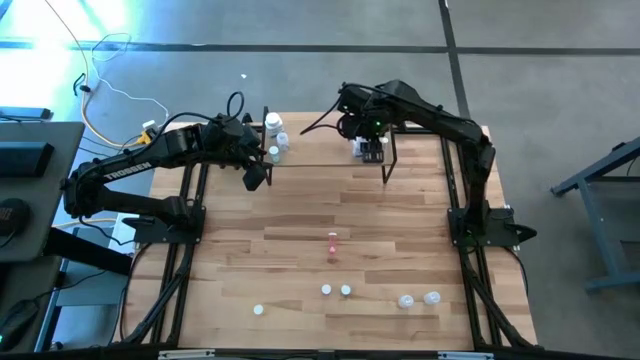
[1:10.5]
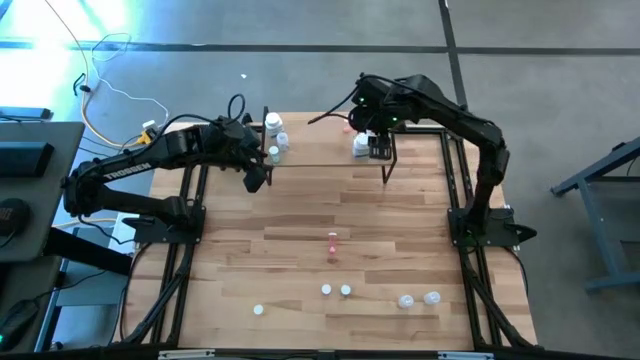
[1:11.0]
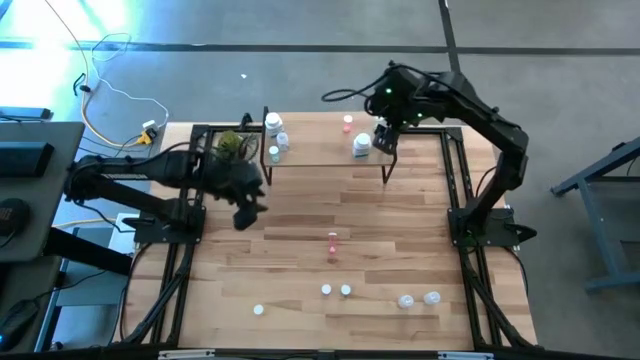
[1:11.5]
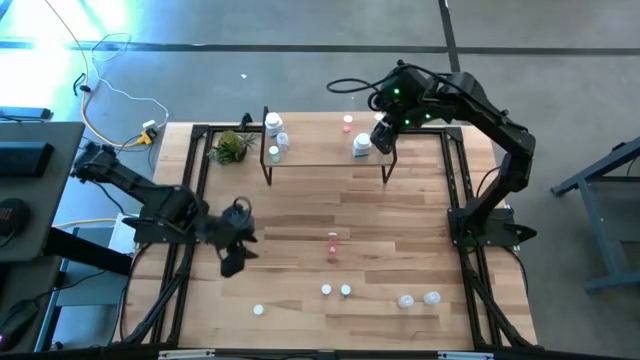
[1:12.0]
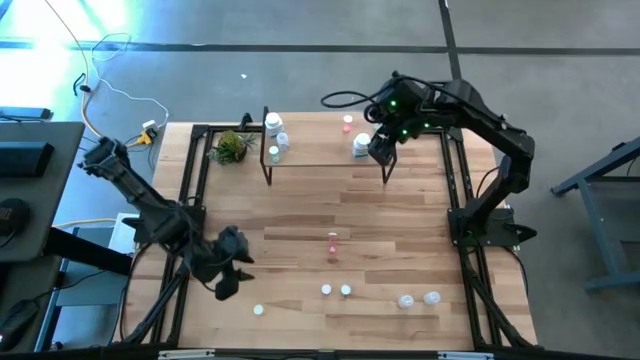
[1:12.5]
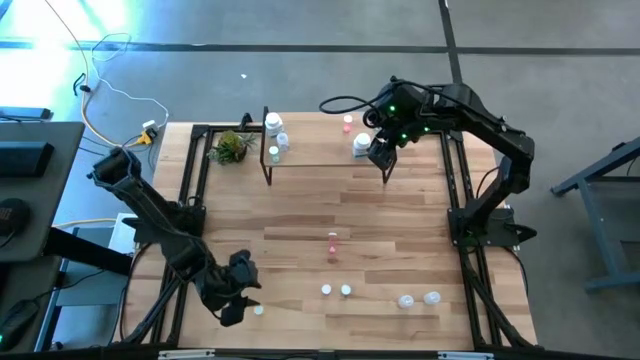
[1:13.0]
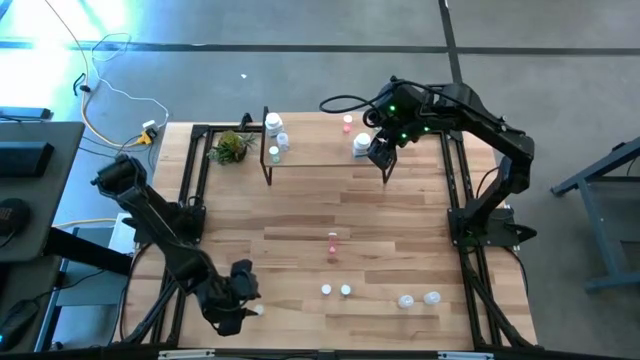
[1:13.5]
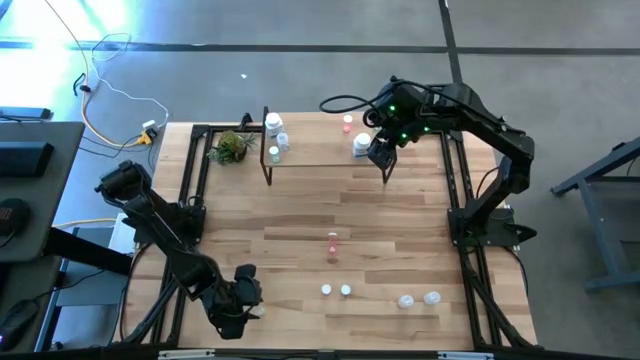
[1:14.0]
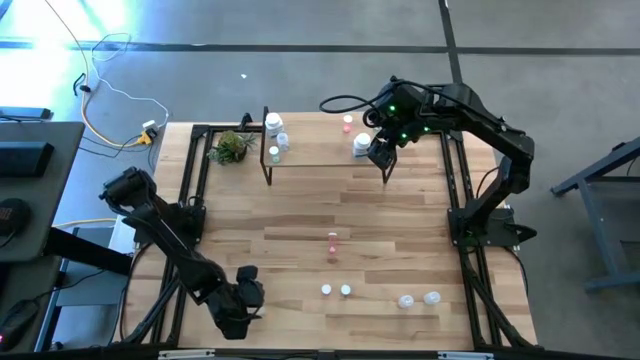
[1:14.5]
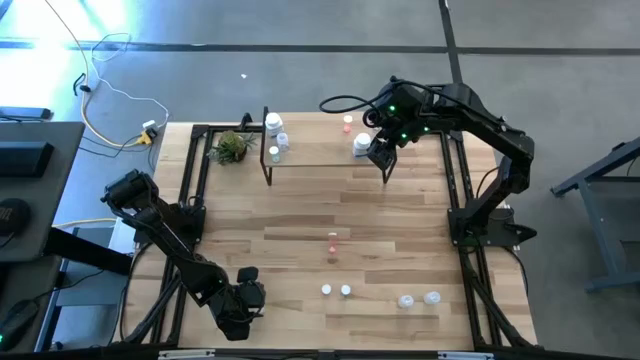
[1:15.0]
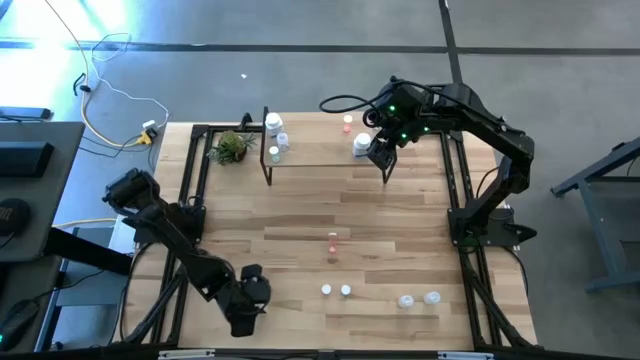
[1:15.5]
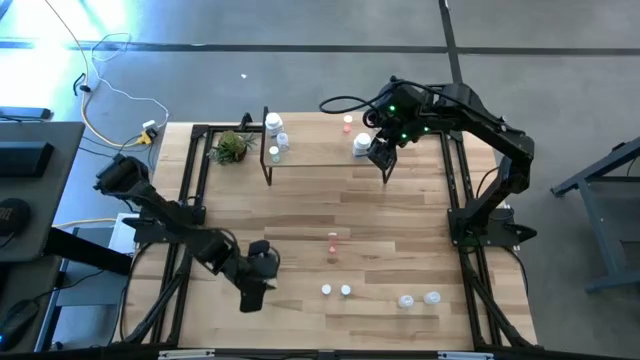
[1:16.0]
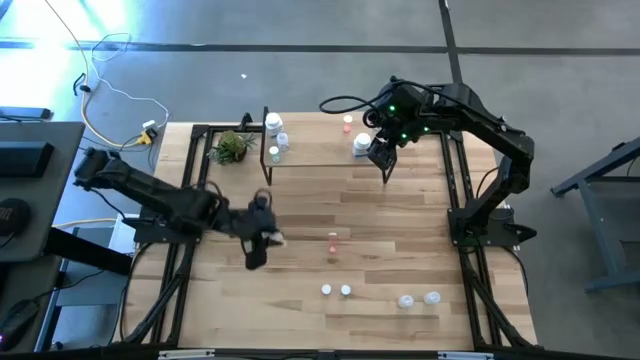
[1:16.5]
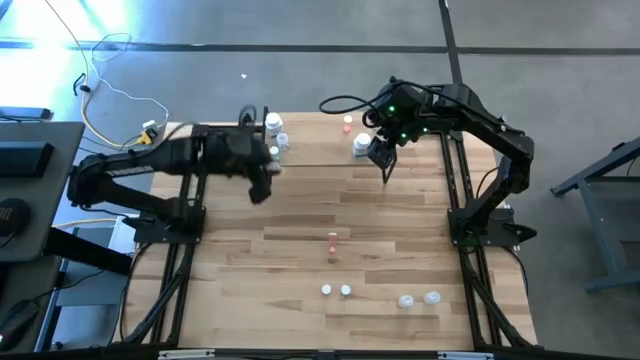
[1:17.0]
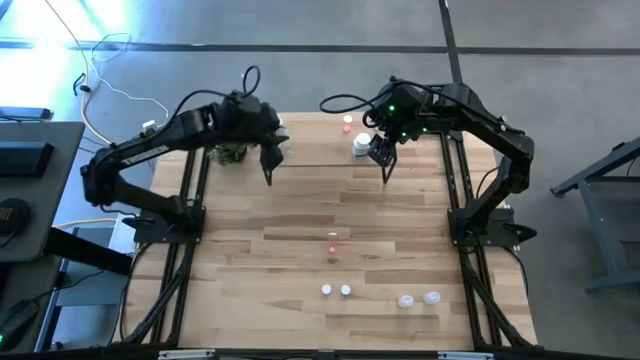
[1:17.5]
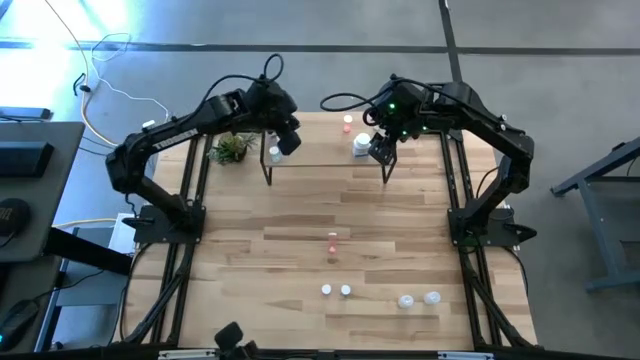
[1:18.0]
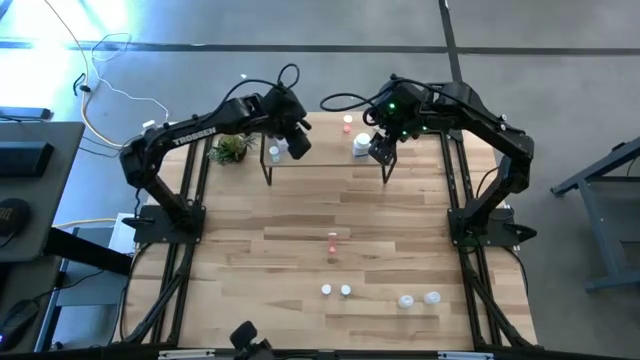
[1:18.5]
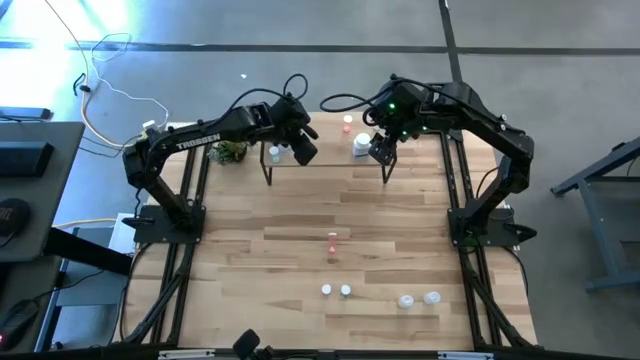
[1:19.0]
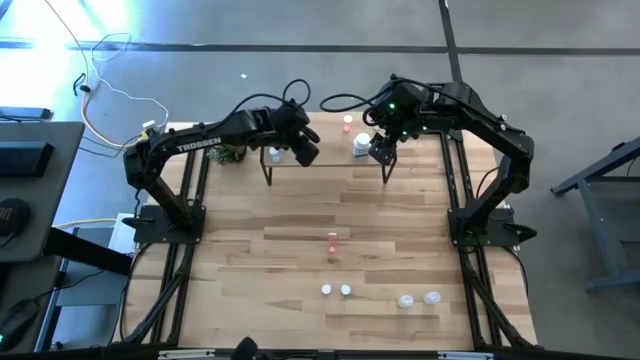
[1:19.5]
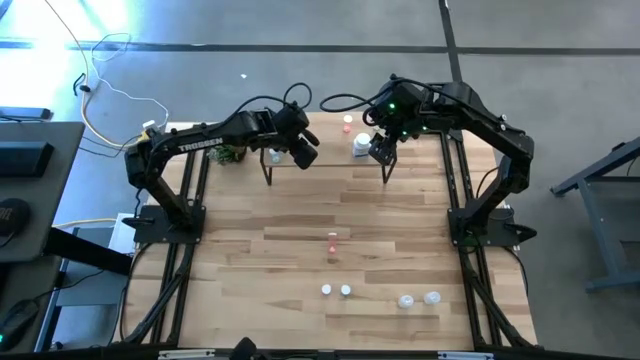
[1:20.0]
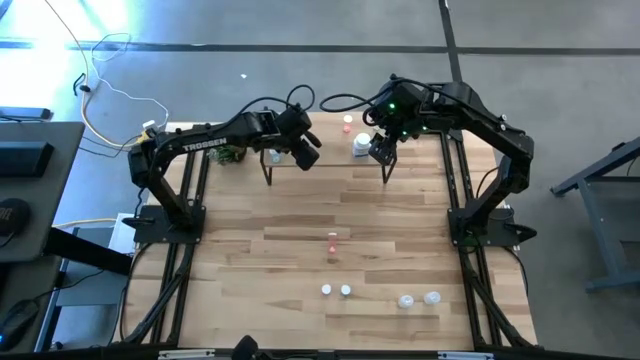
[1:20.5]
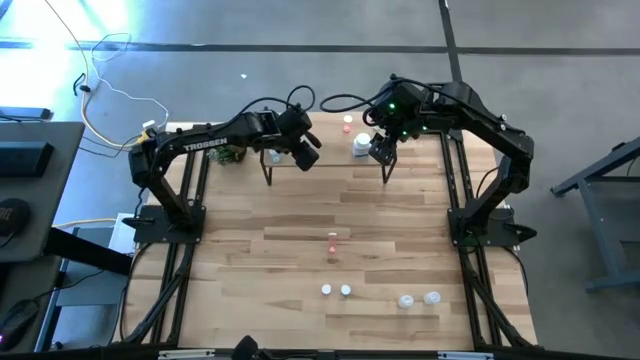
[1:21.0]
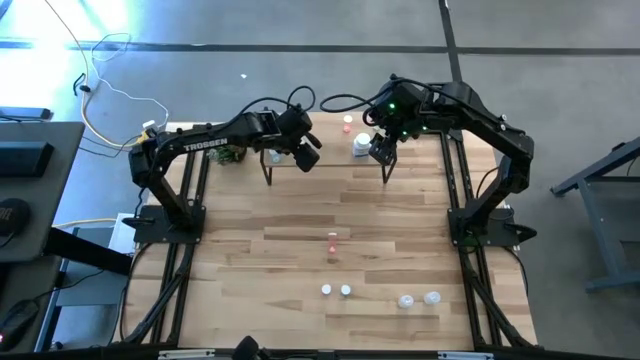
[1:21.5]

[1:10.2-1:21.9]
Task: Pick and place medicine bottles onto shelf by color
Put the yellow pill bottle on the shelf

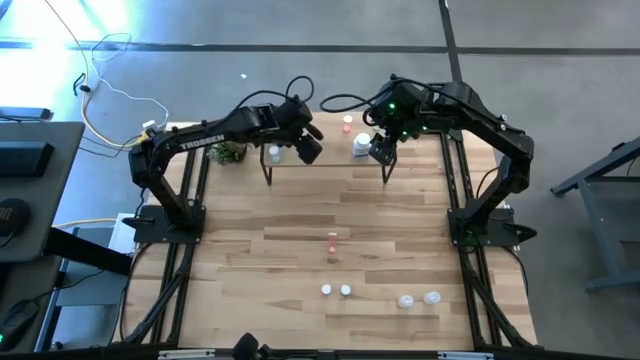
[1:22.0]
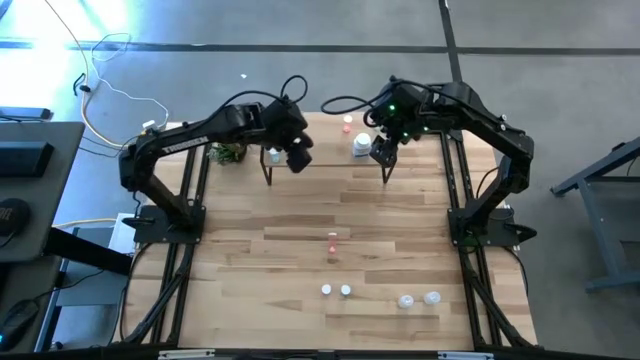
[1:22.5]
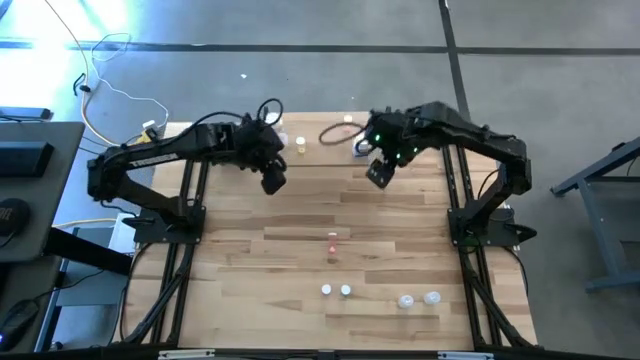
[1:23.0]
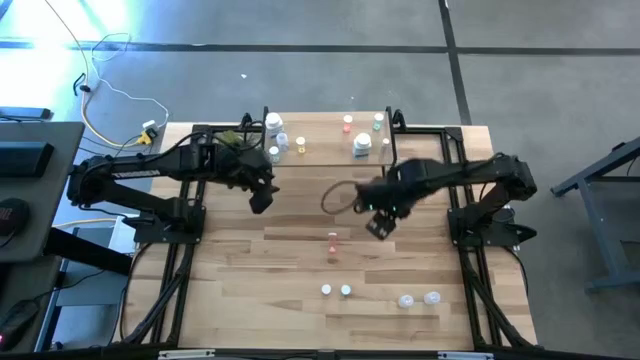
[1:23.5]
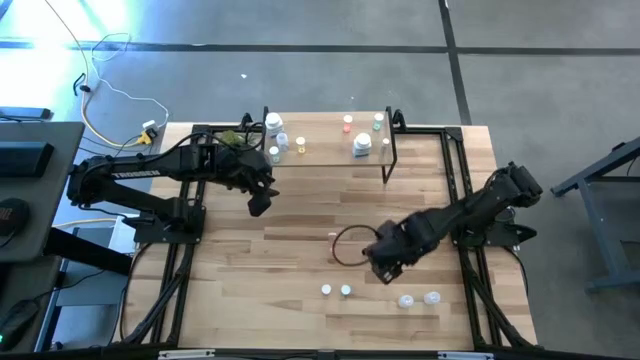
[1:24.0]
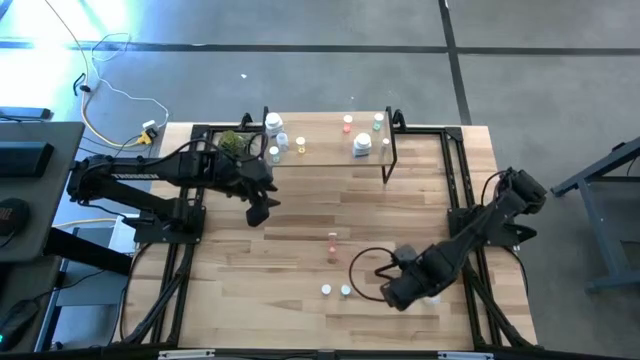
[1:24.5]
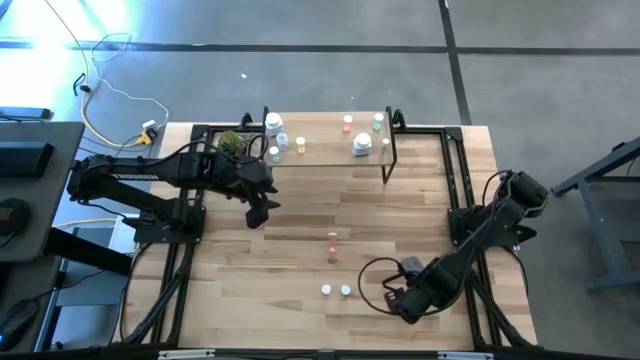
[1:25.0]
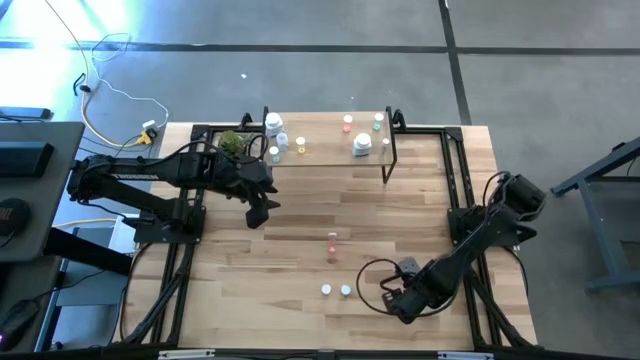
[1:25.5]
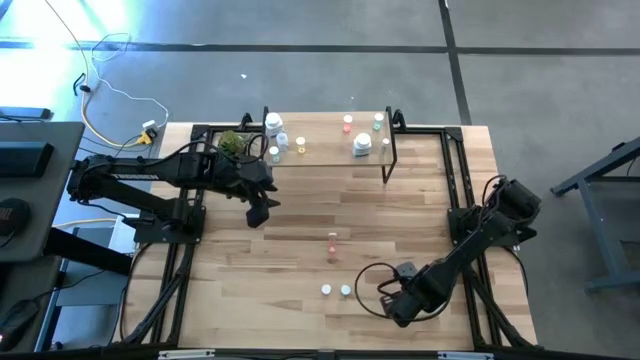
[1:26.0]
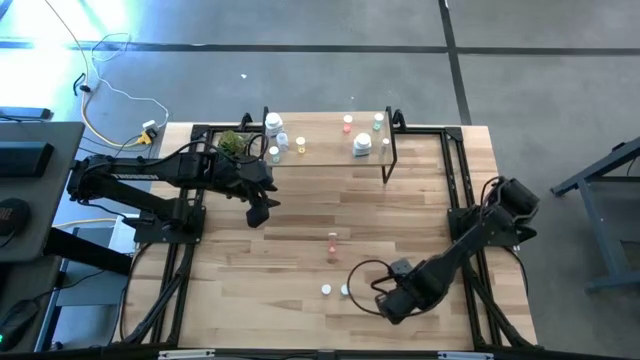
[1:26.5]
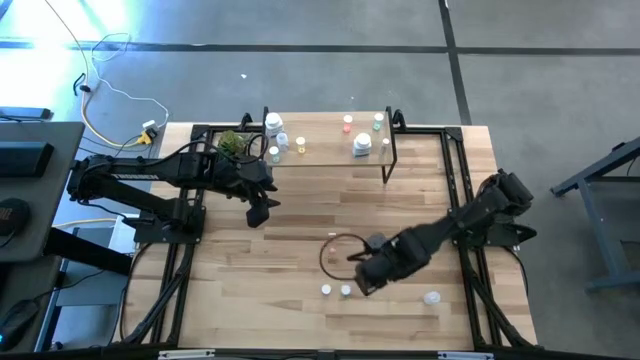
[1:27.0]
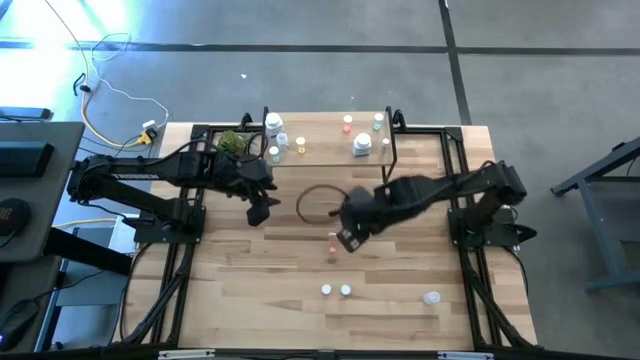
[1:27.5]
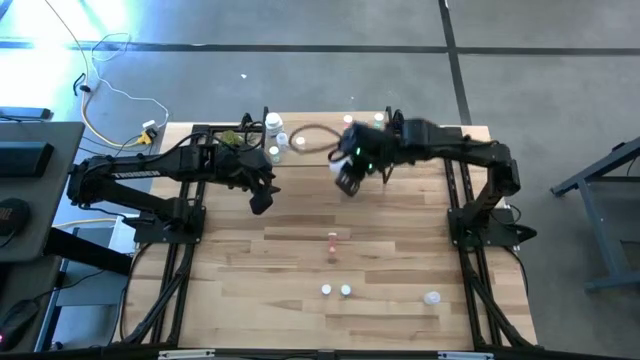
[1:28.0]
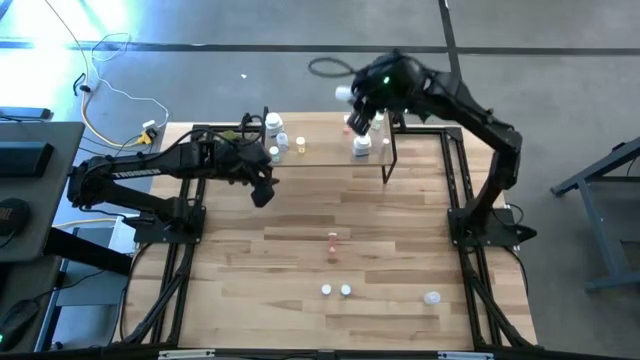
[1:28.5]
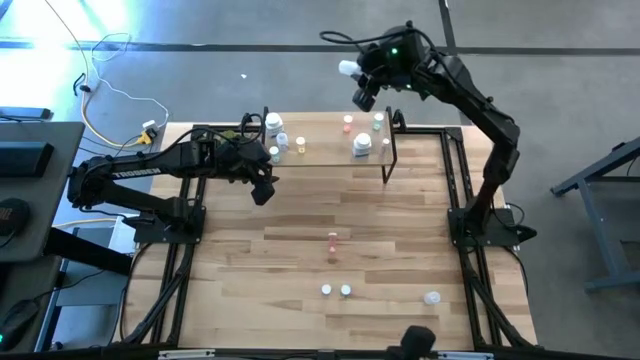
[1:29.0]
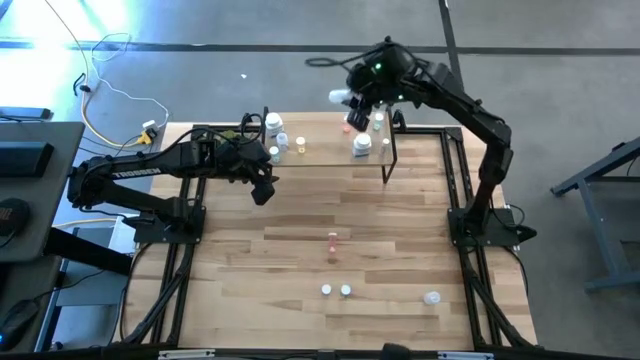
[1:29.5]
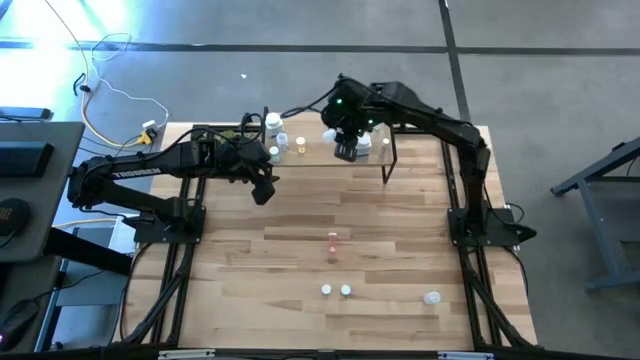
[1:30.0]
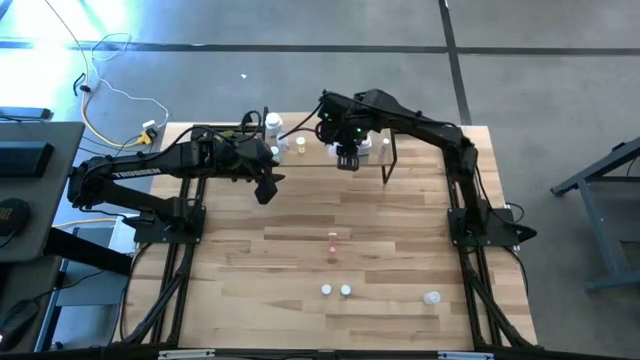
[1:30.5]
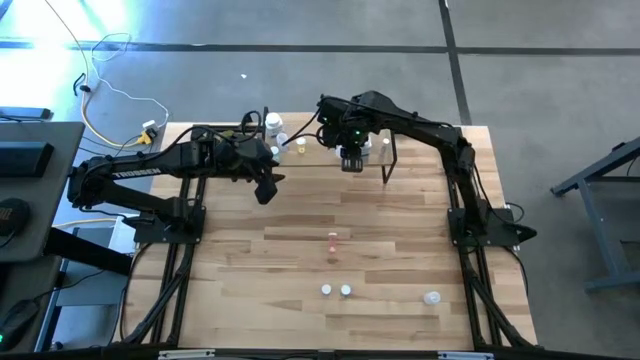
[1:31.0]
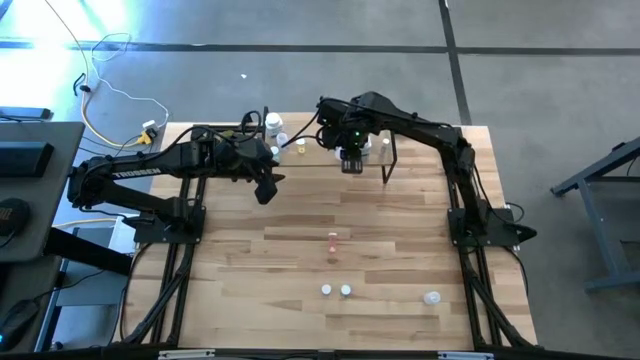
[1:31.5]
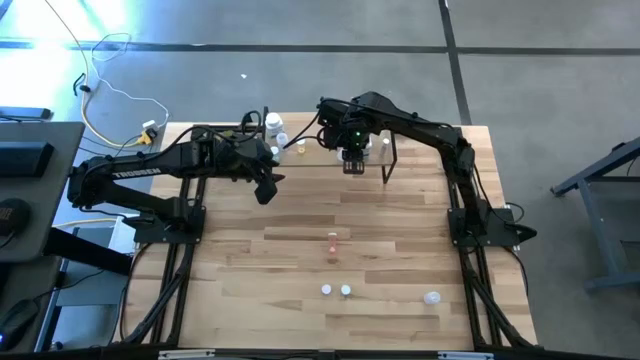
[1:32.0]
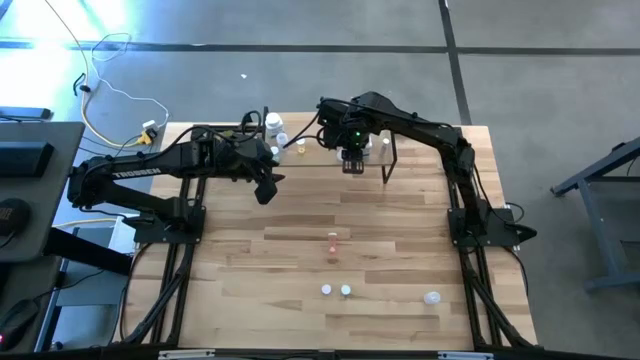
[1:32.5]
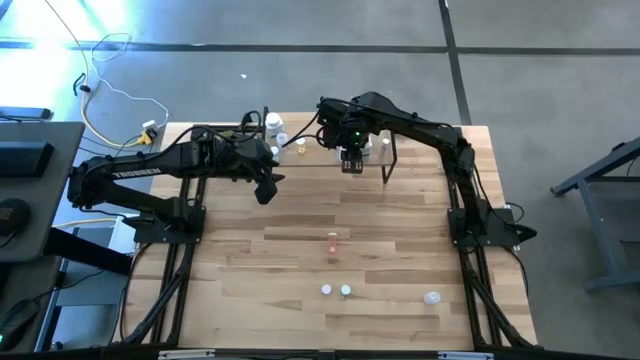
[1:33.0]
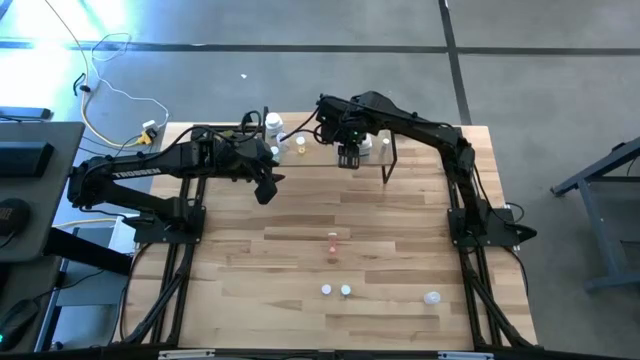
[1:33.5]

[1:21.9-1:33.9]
Put the left small white pill bottle on the shelf
